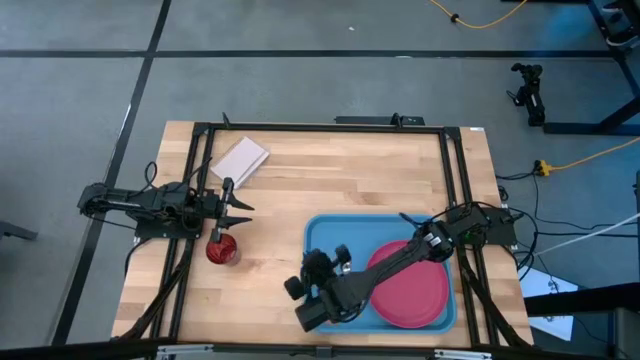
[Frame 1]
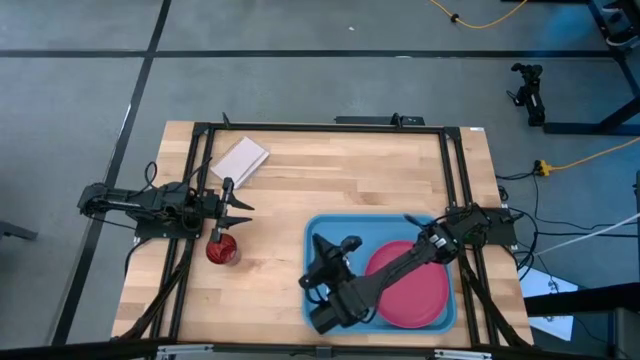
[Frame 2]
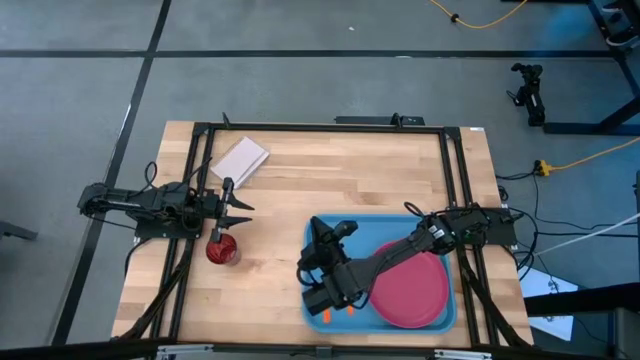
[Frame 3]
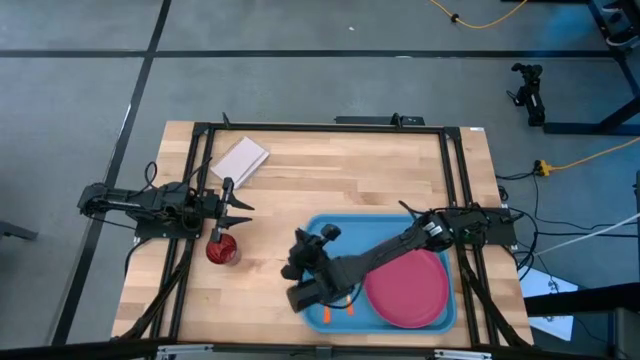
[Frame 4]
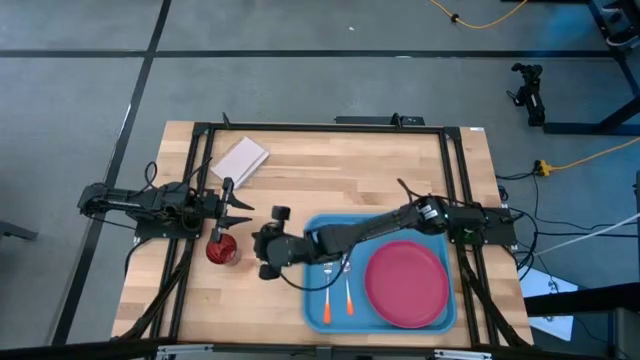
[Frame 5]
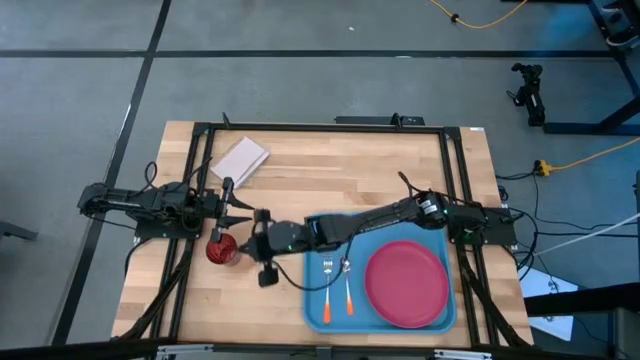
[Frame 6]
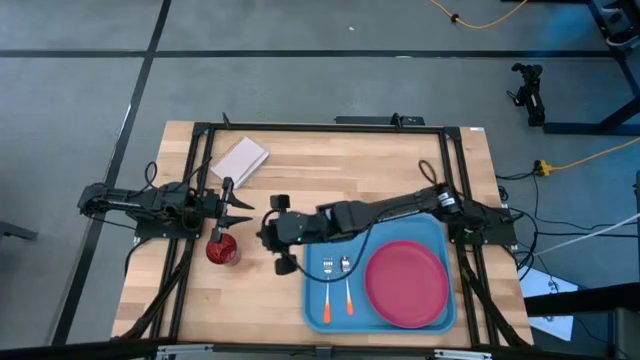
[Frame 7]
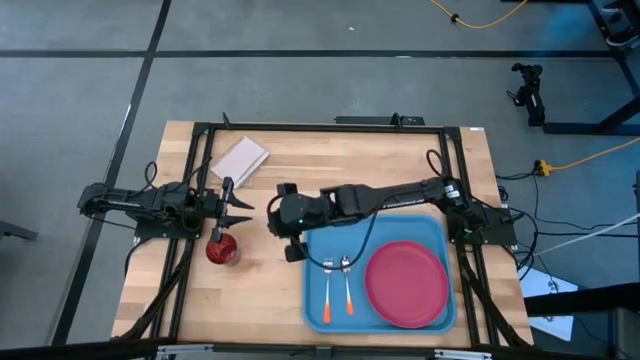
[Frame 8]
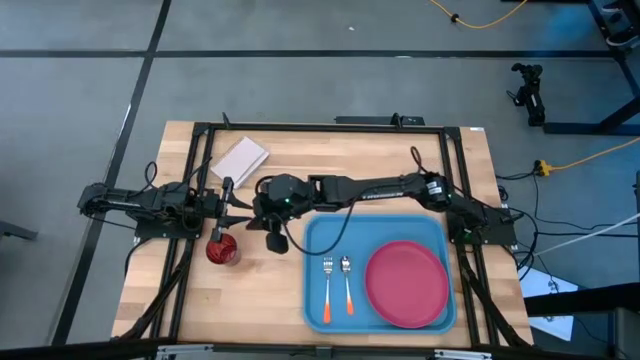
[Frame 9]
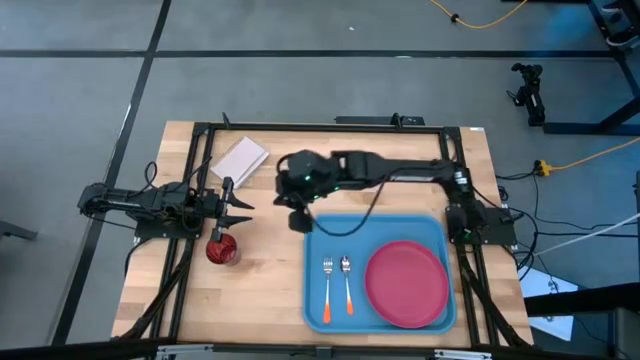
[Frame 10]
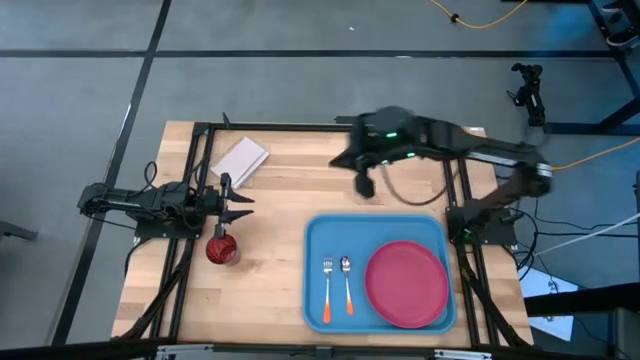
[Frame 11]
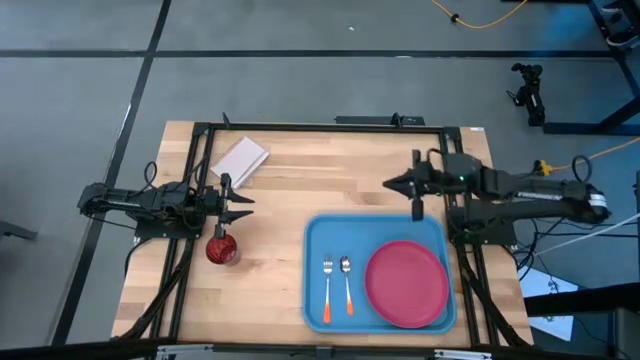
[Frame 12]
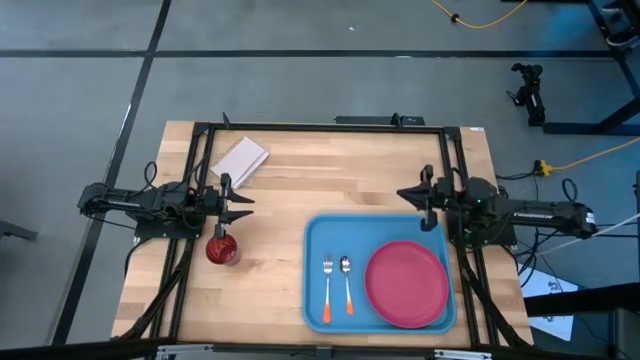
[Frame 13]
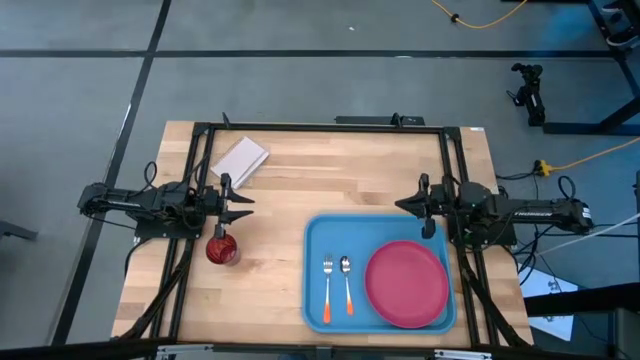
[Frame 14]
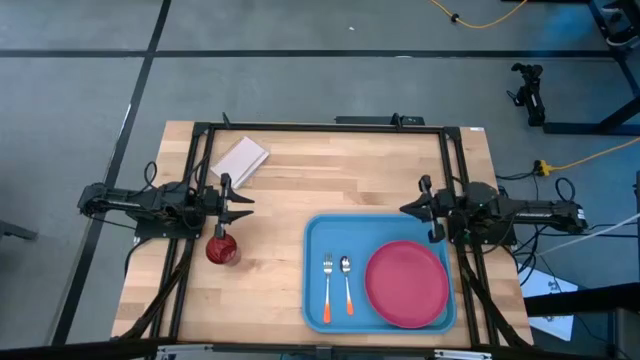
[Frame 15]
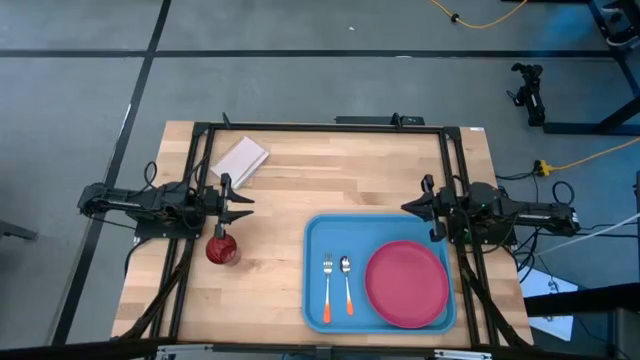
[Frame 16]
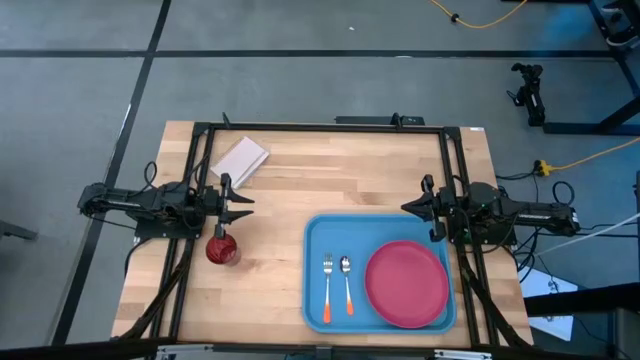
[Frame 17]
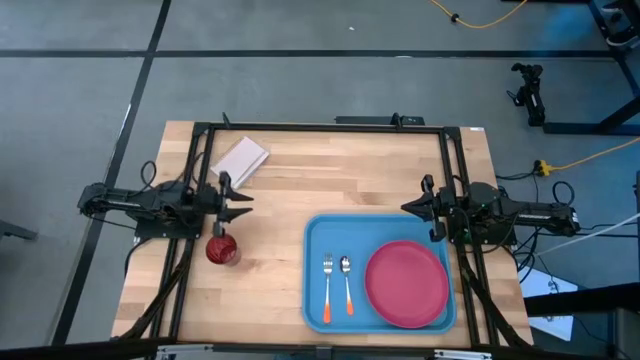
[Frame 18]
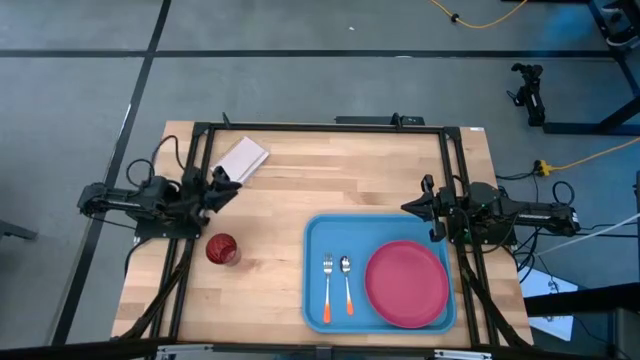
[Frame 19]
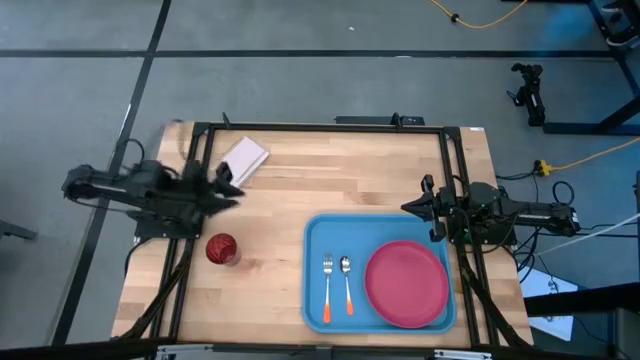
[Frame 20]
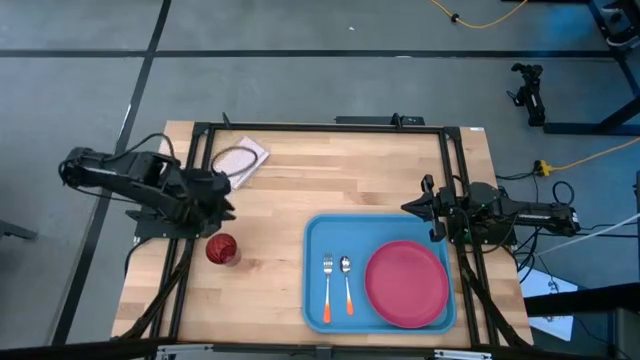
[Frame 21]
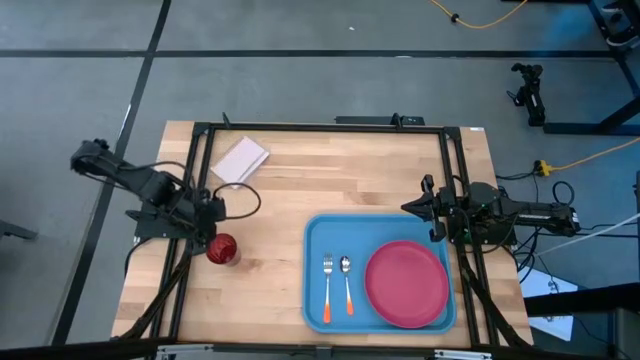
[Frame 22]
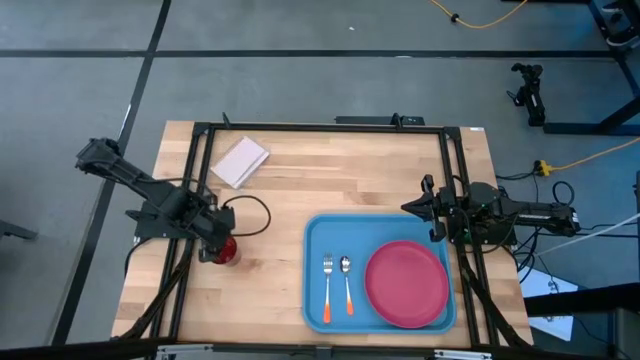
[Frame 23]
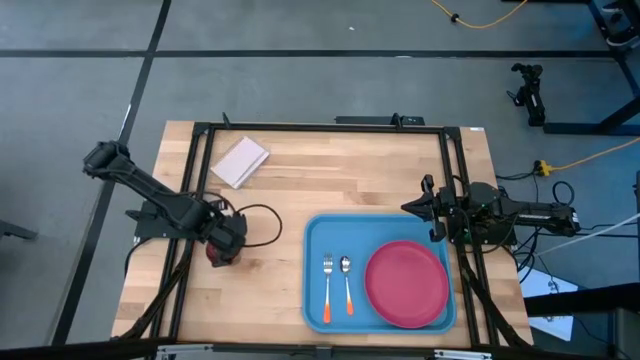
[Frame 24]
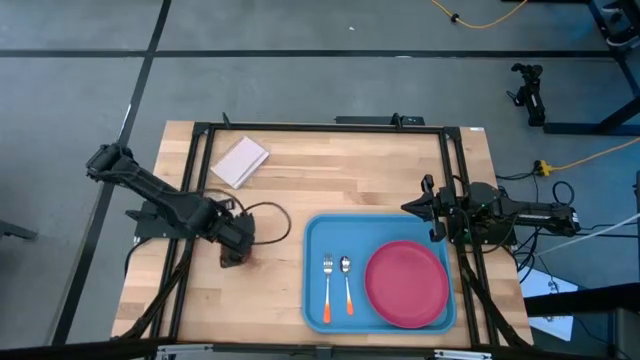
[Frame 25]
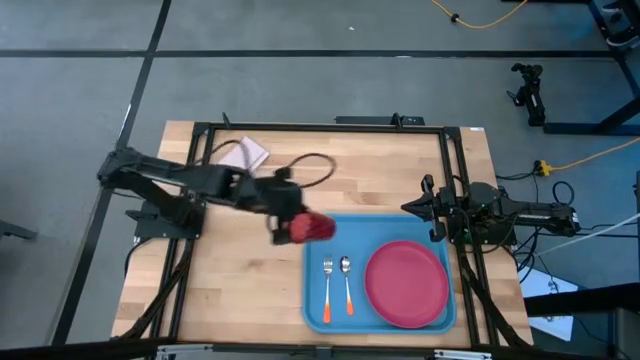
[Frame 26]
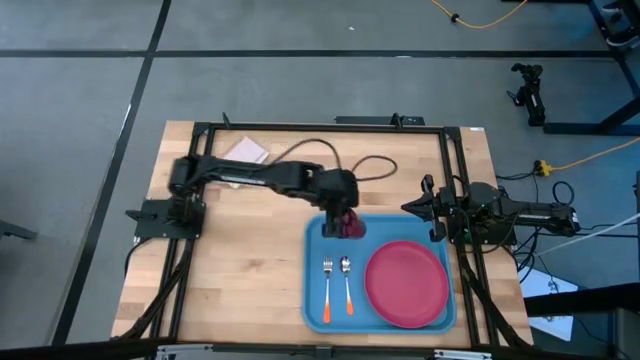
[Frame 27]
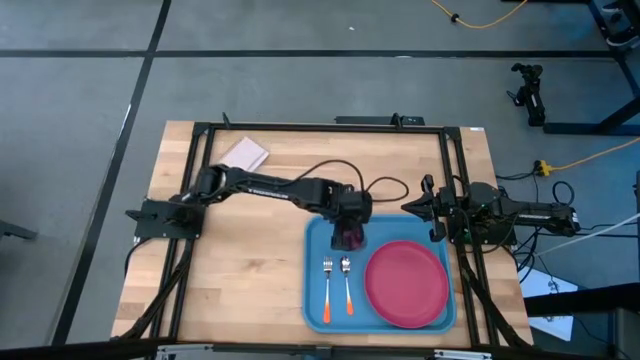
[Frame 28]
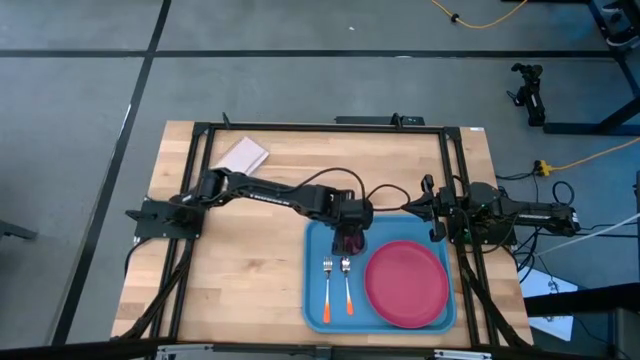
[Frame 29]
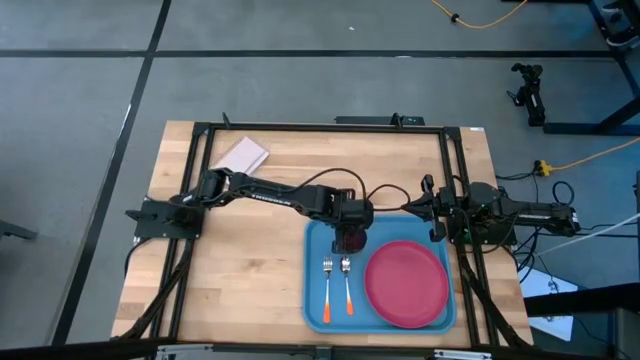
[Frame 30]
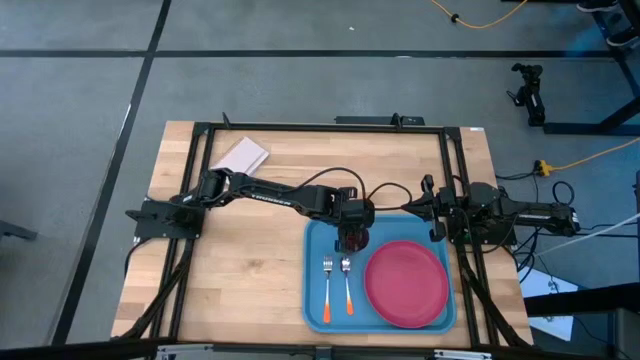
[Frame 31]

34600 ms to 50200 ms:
Task: Pick and place plate/cup/fork/spoon on tray
Put the red cup on blue tray

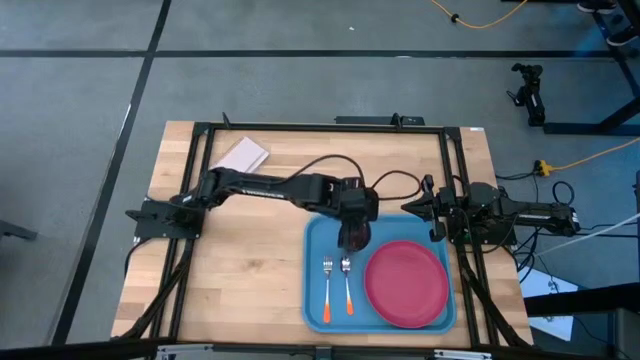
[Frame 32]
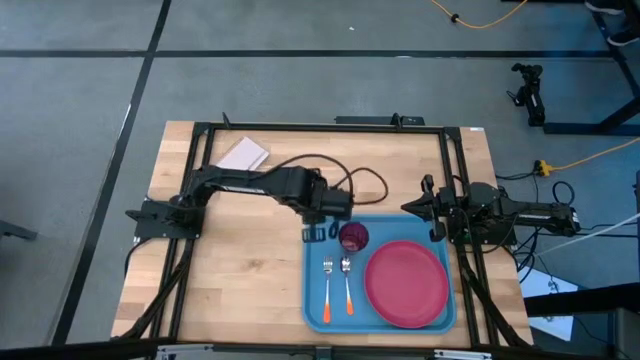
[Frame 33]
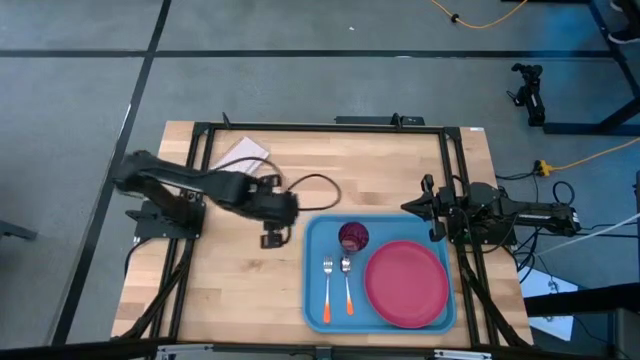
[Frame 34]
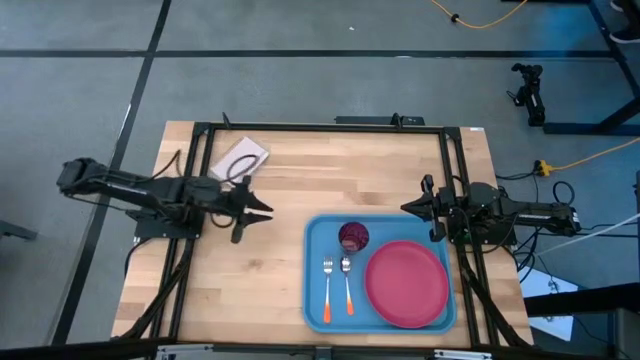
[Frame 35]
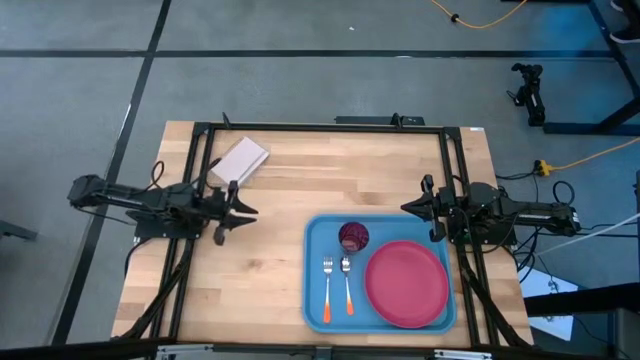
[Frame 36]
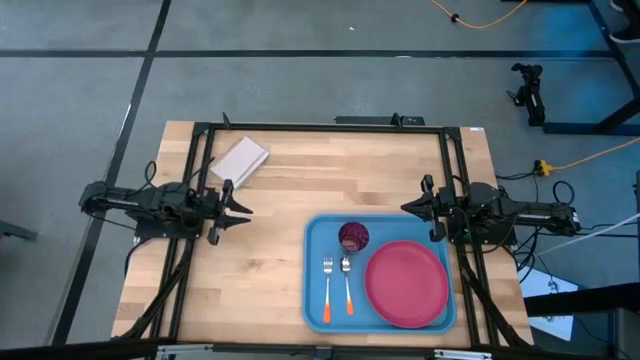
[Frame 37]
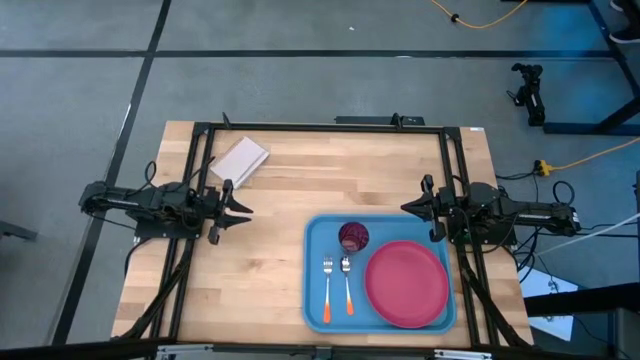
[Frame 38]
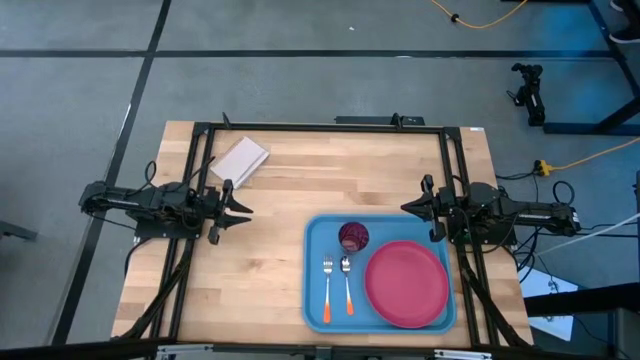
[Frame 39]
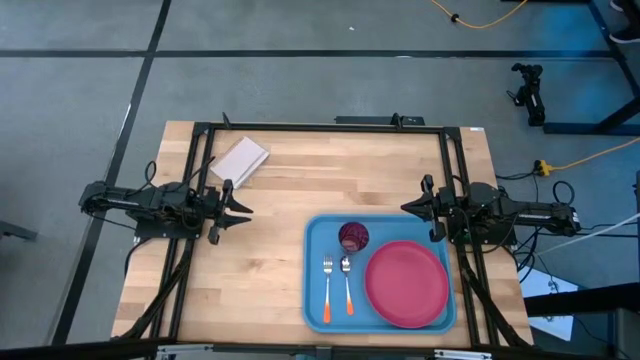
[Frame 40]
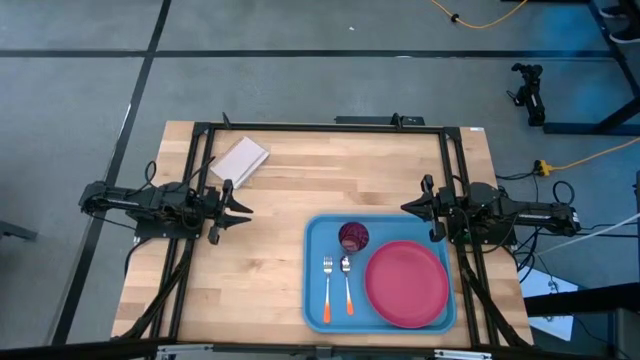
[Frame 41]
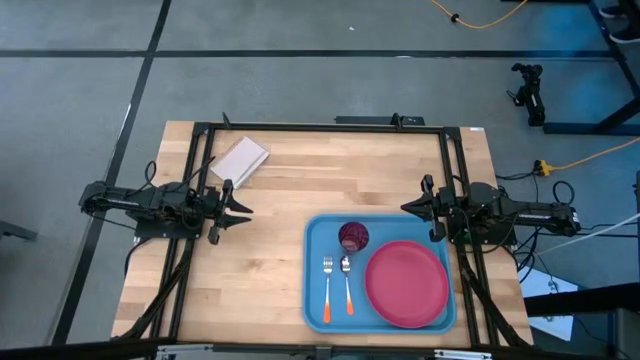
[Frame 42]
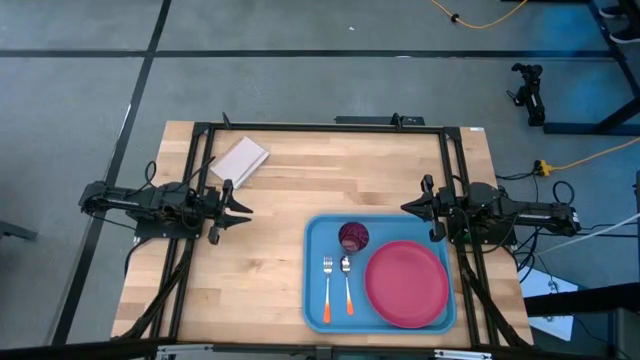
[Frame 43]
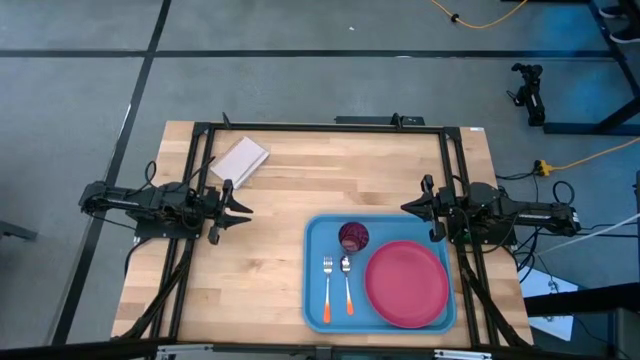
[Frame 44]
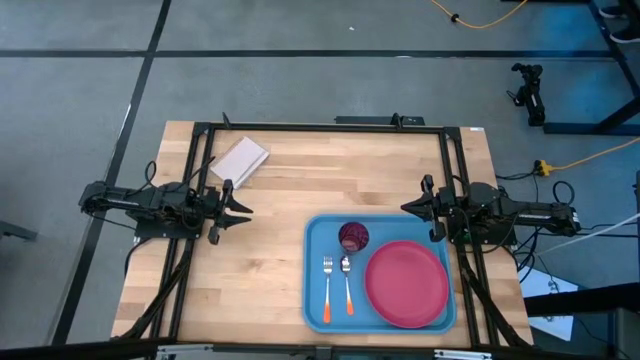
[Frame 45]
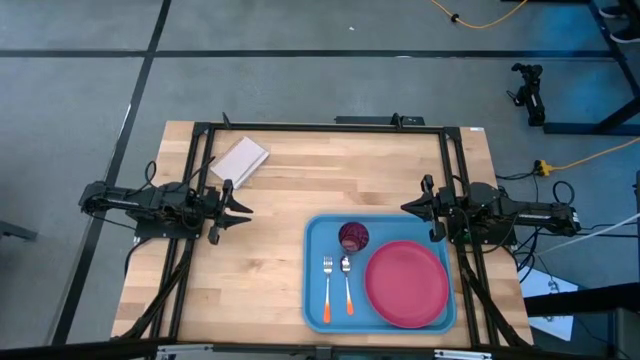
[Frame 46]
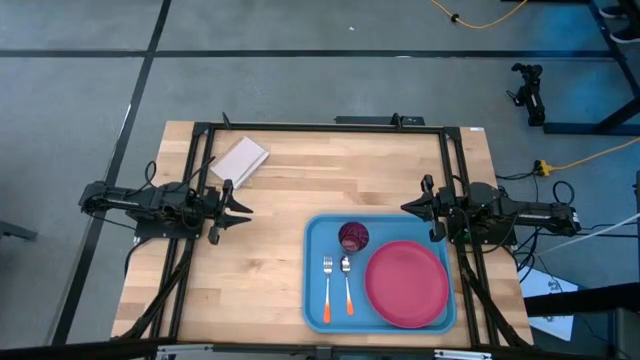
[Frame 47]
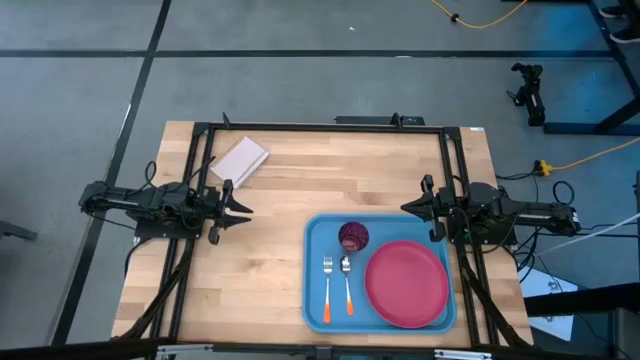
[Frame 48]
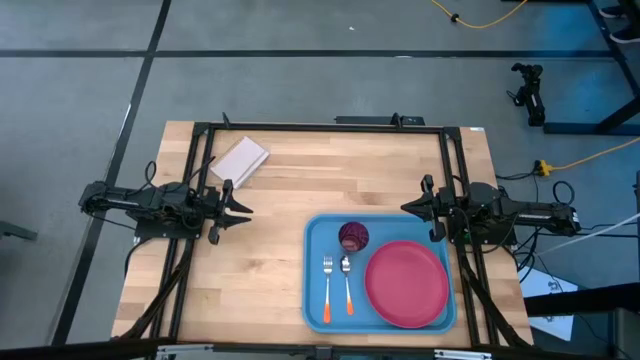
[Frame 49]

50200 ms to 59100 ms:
Return to Home Position
